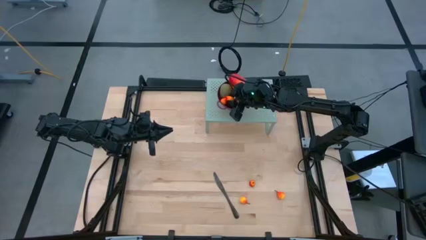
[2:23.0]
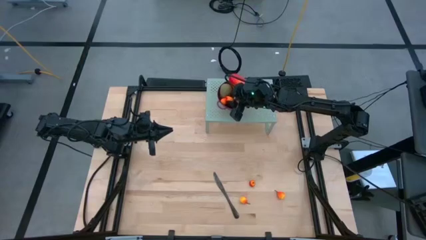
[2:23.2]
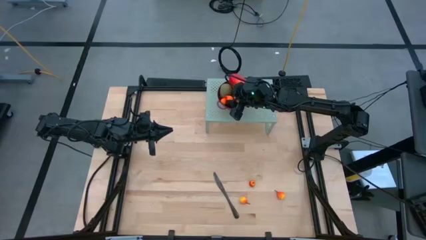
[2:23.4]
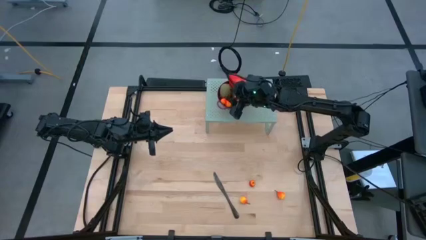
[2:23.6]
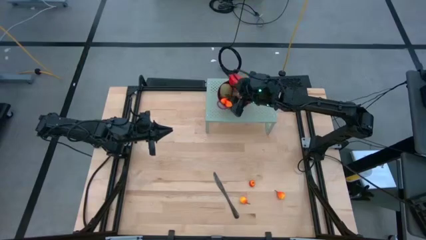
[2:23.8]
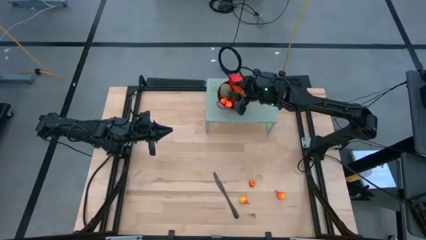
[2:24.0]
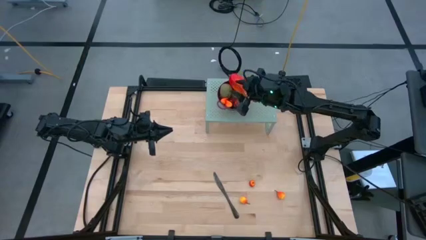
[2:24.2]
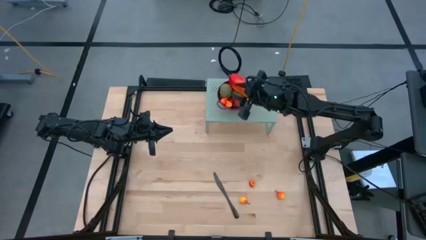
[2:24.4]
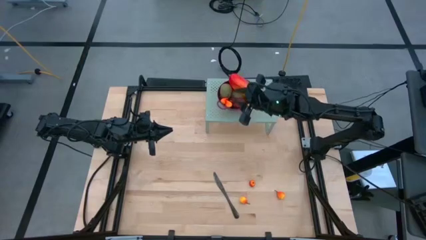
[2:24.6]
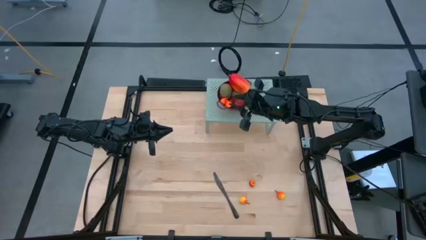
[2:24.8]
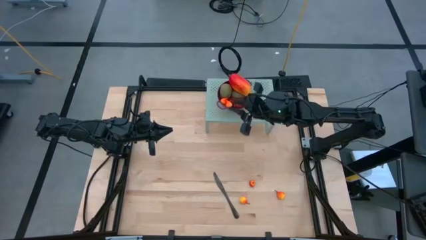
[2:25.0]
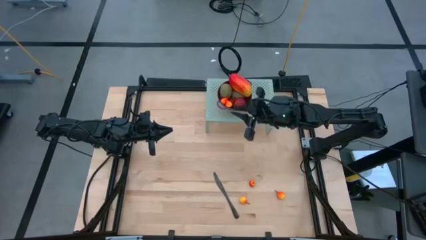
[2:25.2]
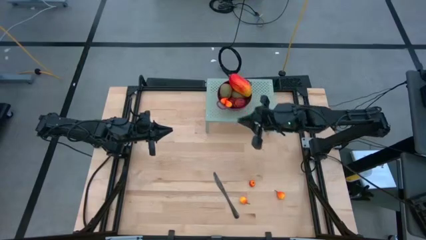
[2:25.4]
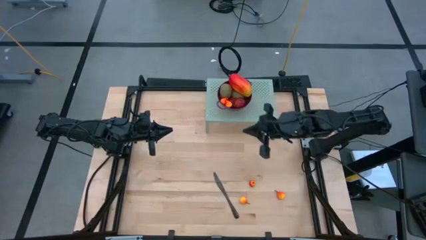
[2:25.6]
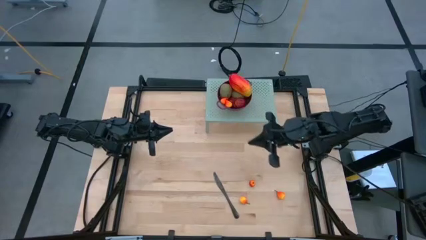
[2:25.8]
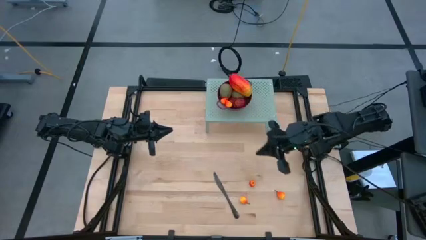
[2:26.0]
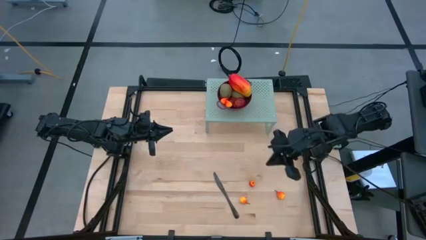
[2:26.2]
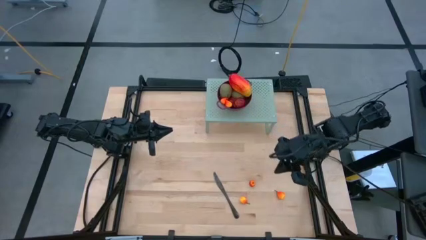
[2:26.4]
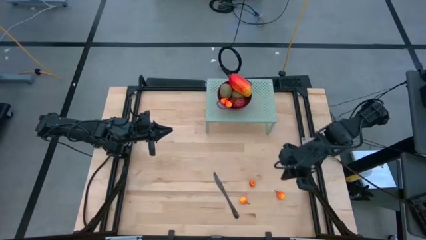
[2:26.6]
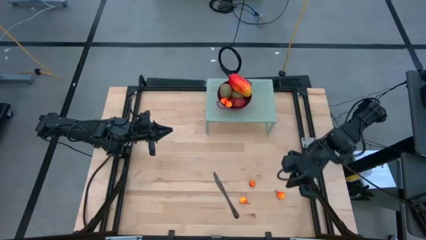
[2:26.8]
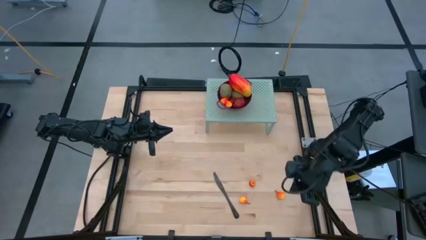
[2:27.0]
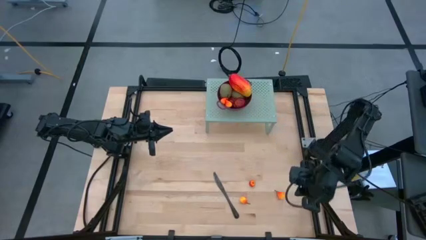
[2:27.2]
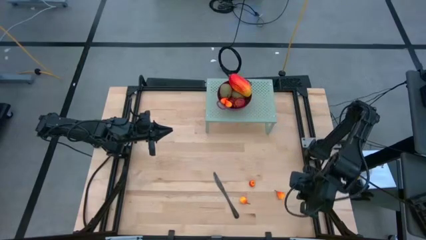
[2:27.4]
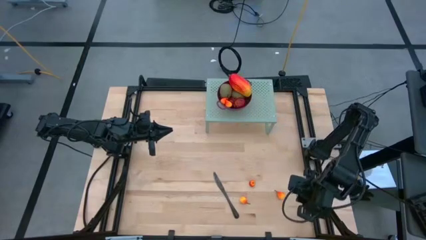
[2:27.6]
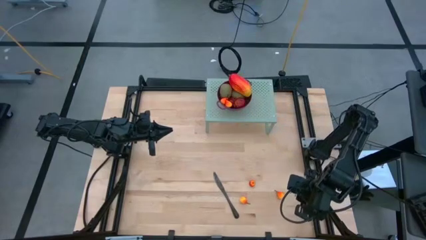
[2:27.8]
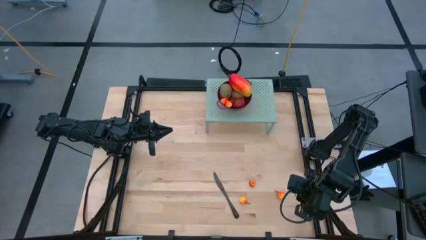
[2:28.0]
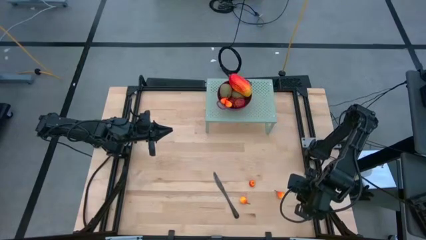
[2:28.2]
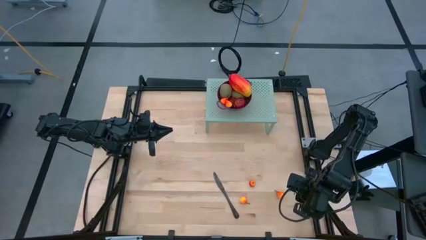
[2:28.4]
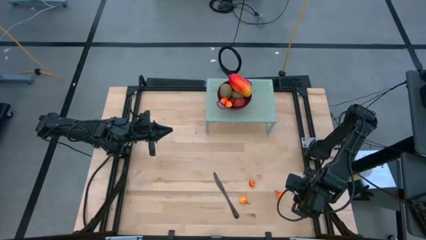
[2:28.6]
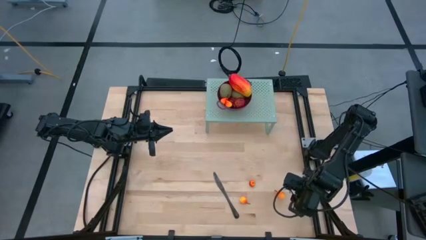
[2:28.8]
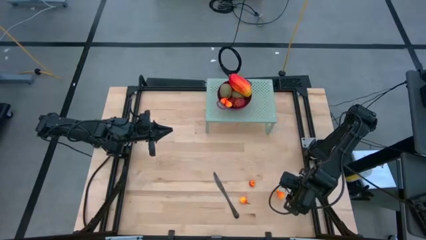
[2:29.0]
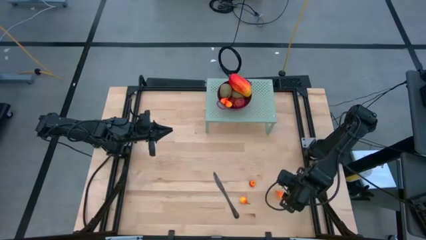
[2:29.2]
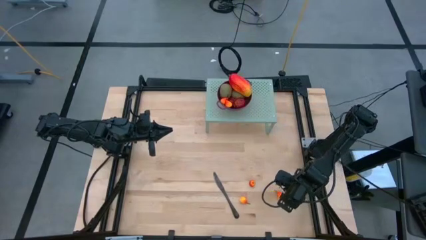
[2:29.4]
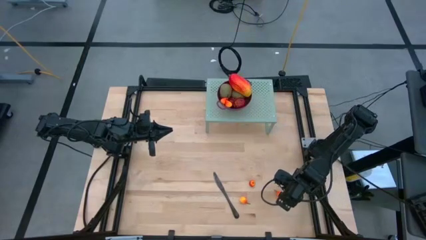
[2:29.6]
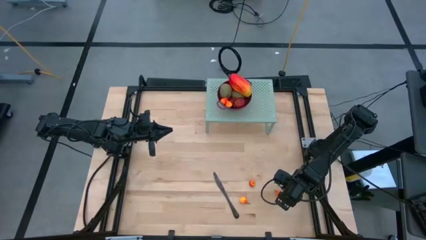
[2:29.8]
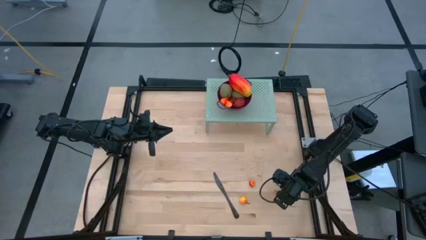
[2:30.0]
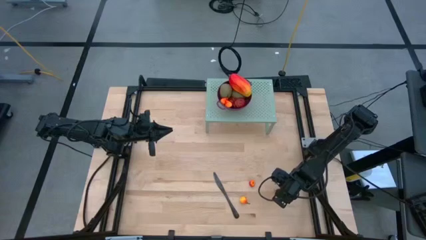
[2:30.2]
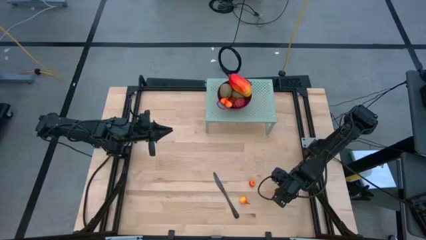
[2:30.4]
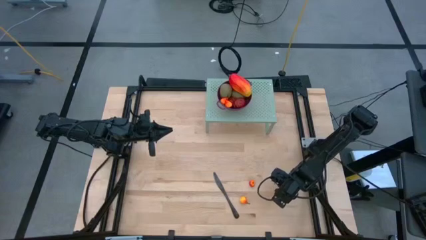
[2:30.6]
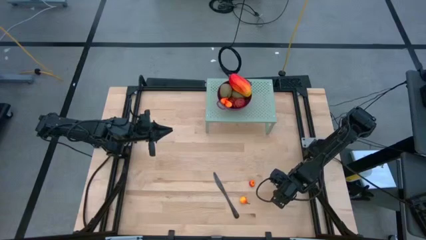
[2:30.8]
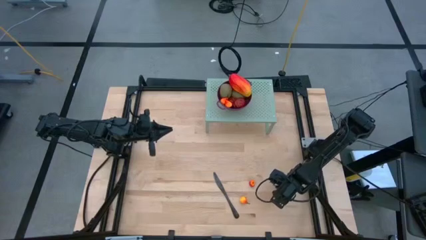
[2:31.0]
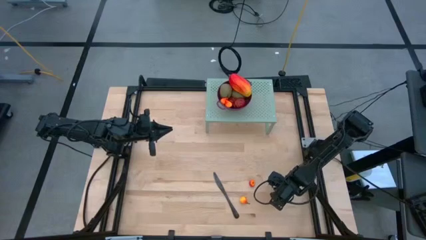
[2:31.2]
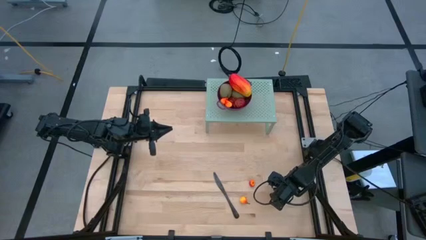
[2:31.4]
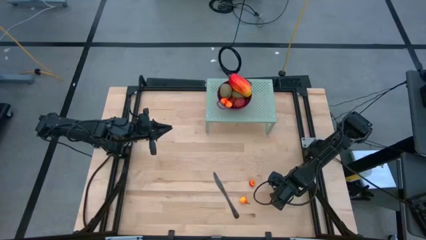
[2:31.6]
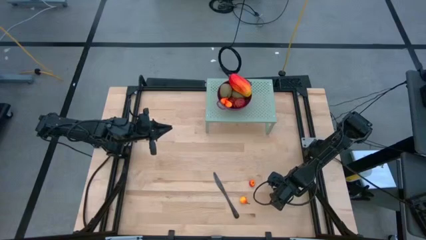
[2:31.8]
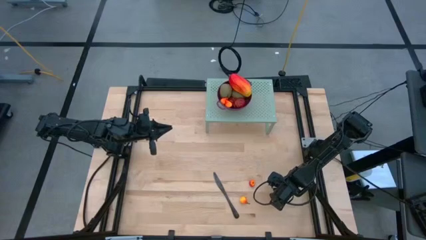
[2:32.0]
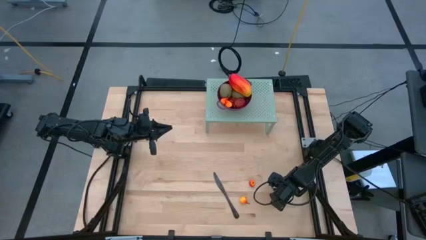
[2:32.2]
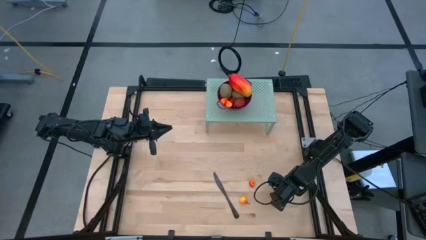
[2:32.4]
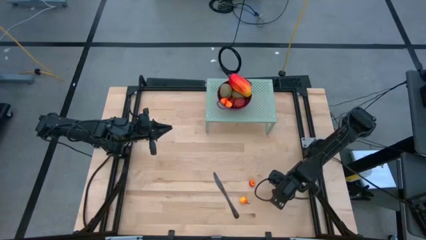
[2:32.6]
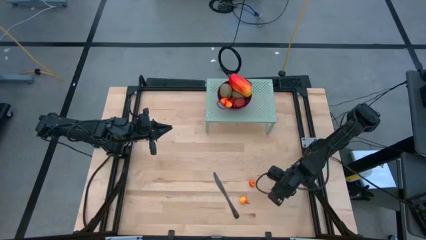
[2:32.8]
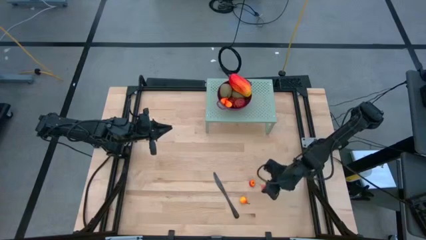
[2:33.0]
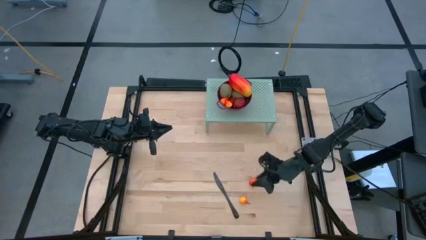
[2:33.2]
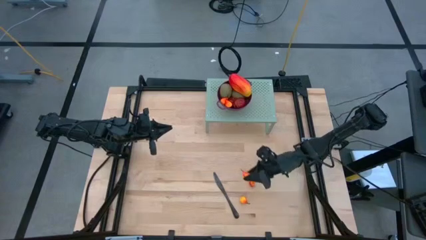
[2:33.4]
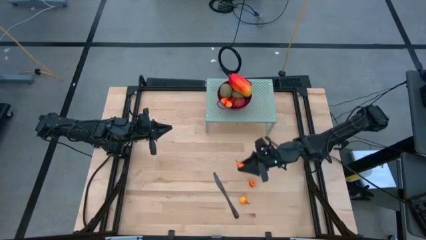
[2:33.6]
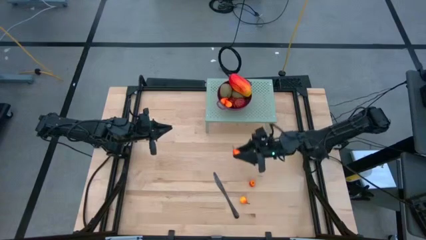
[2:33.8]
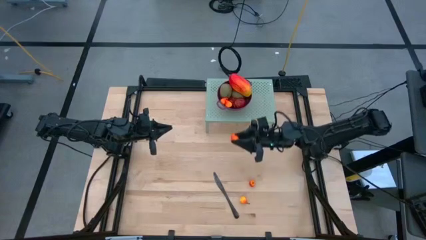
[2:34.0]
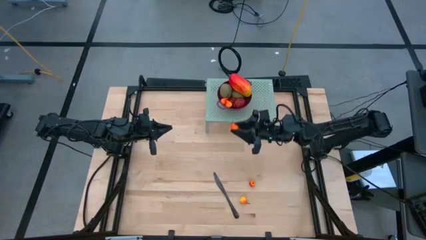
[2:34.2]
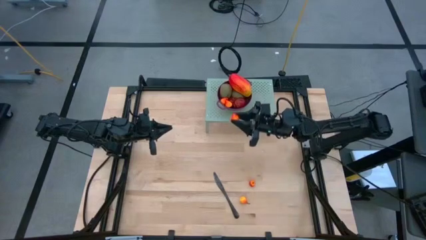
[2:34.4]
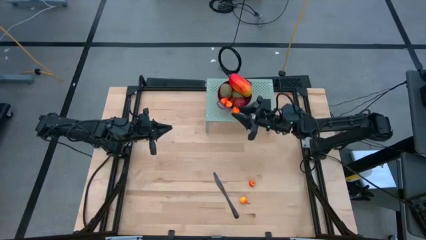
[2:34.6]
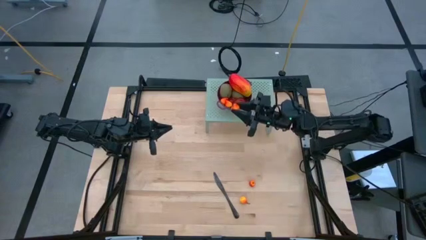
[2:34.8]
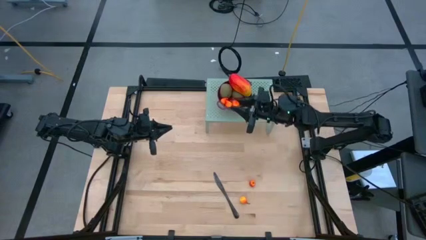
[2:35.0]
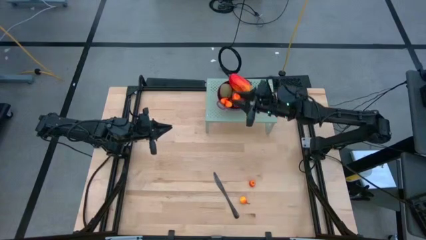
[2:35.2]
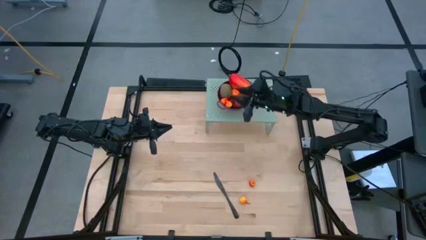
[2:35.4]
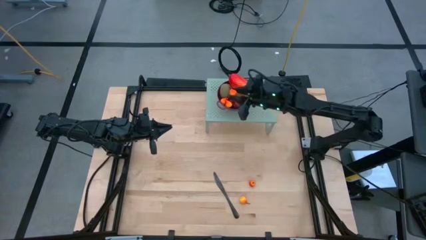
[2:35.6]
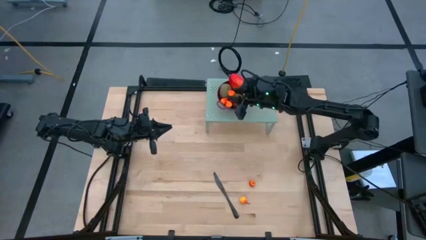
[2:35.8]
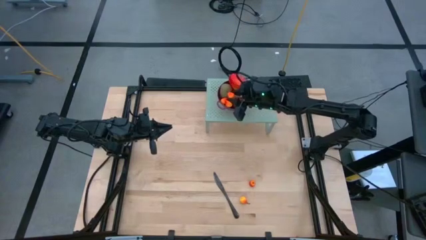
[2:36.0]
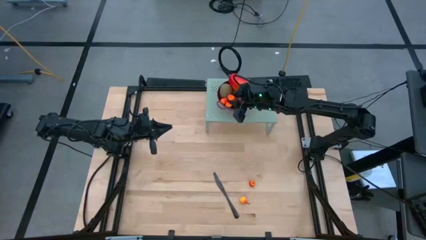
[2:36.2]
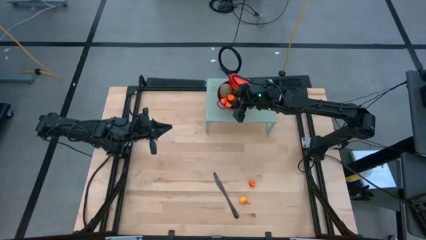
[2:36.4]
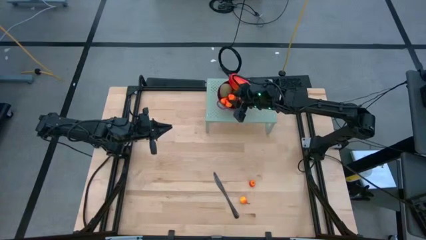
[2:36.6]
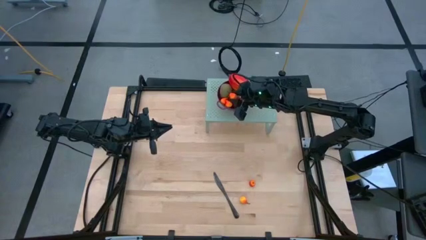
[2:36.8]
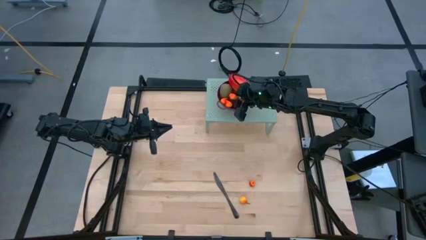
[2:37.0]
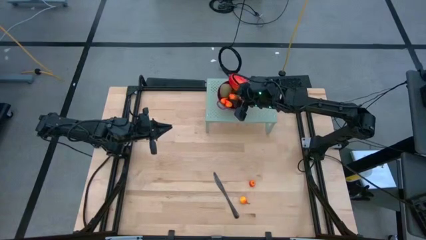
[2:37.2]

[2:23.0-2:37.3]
Task: Pick & Place Fruit
Put the orange pear into the violet strainer bowl on the shelf

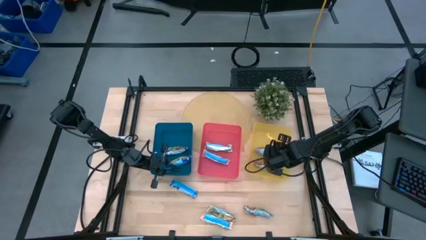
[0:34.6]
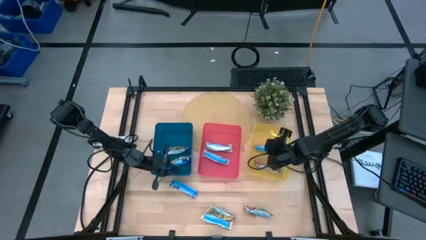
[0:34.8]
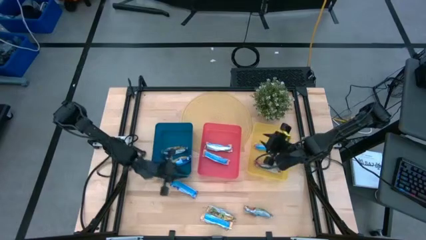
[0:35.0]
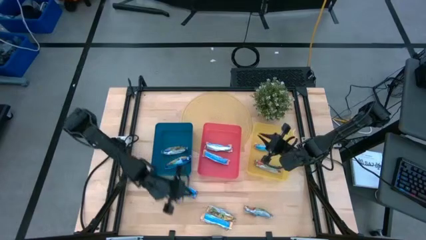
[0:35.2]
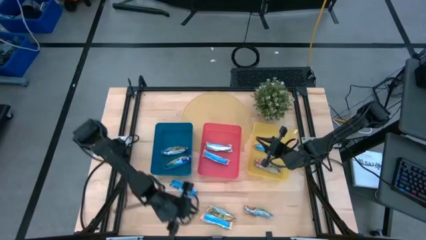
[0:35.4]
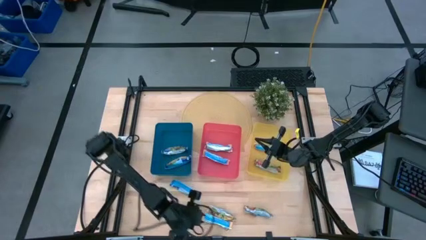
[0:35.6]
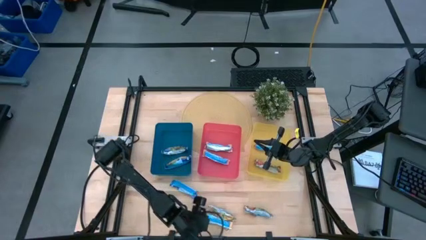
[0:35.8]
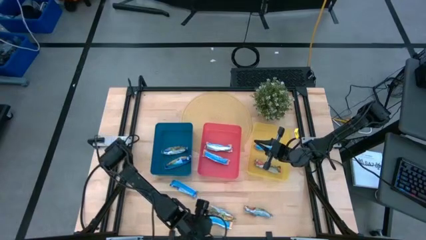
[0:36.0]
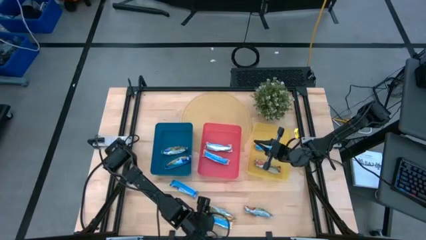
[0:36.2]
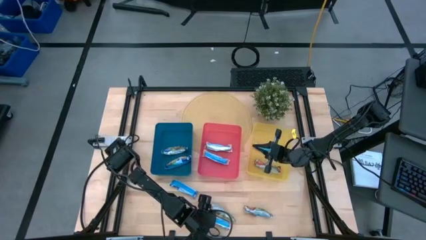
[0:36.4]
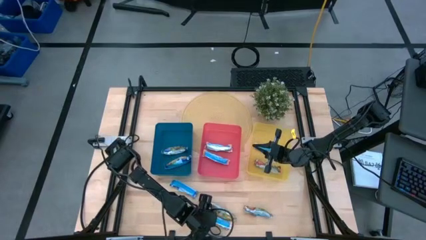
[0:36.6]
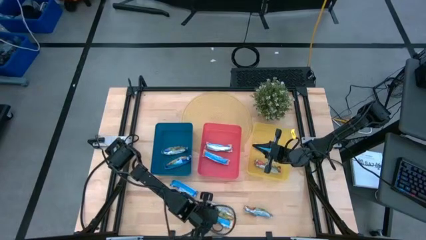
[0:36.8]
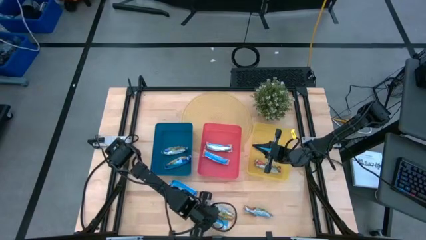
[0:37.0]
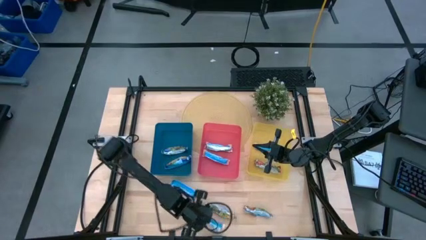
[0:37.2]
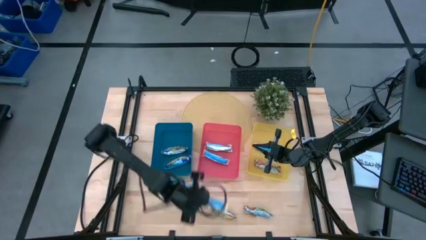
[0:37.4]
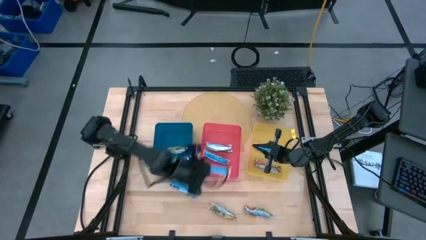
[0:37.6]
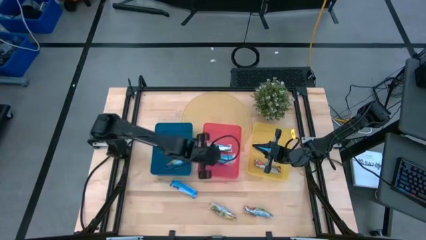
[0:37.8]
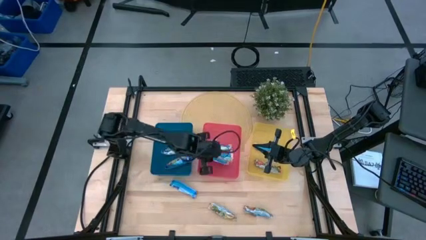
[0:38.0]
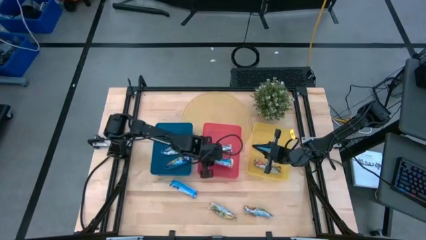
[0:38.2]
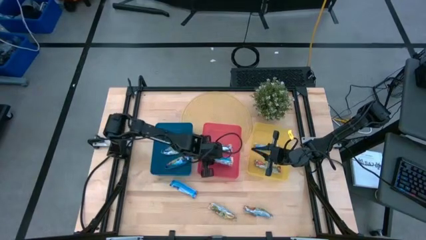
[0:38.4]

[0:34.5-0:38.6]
Task: Pick and place Granola Bars by type
Put the orange granola bar into the red bin
